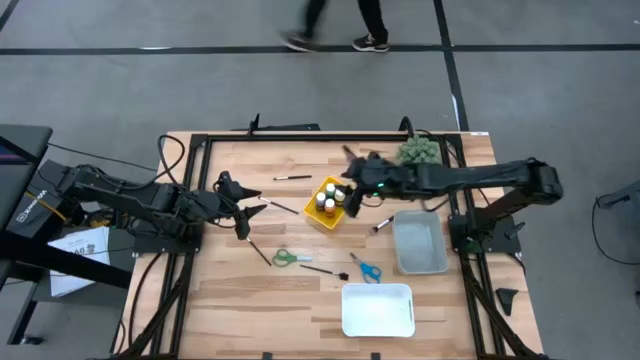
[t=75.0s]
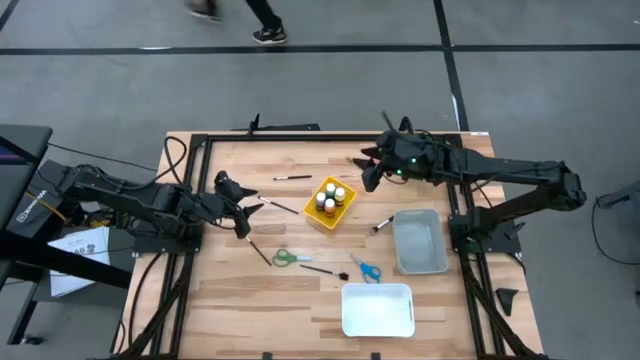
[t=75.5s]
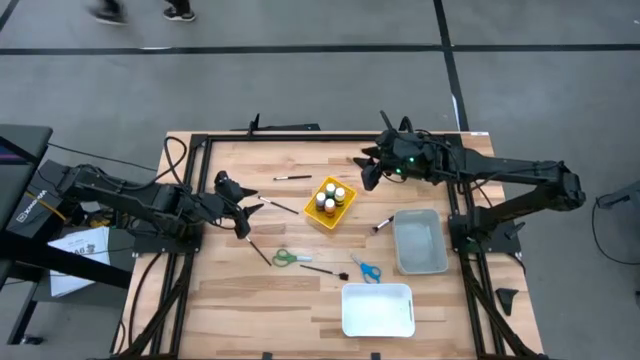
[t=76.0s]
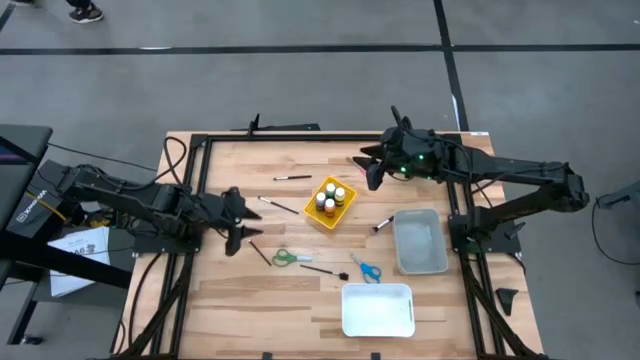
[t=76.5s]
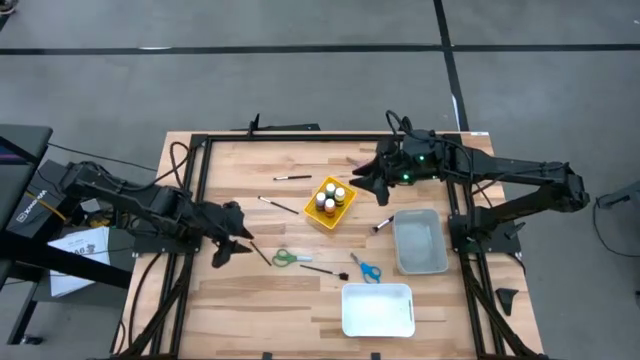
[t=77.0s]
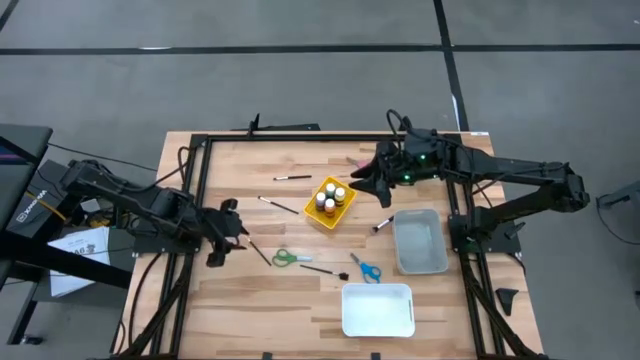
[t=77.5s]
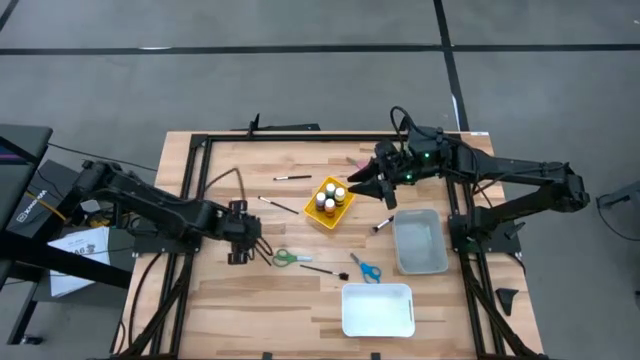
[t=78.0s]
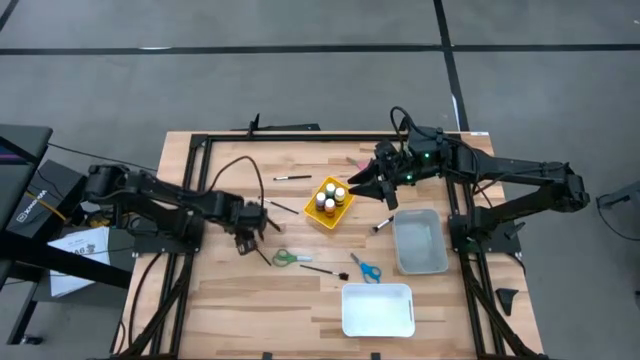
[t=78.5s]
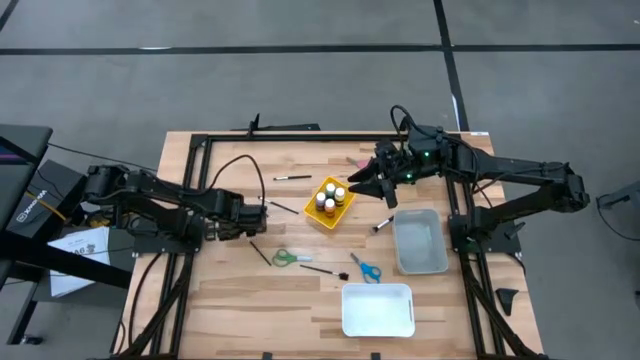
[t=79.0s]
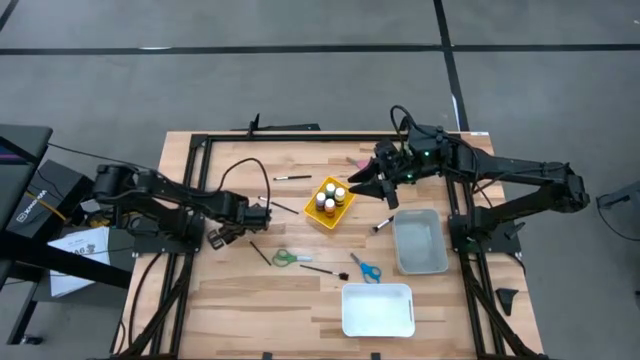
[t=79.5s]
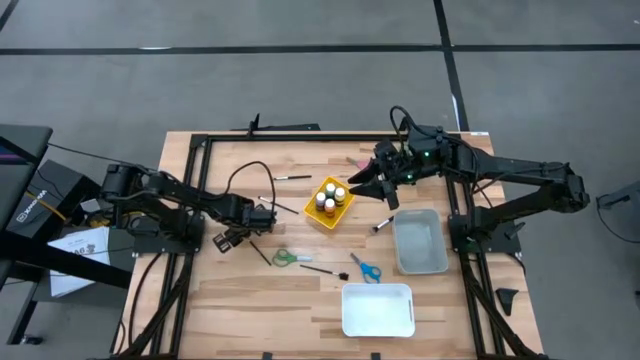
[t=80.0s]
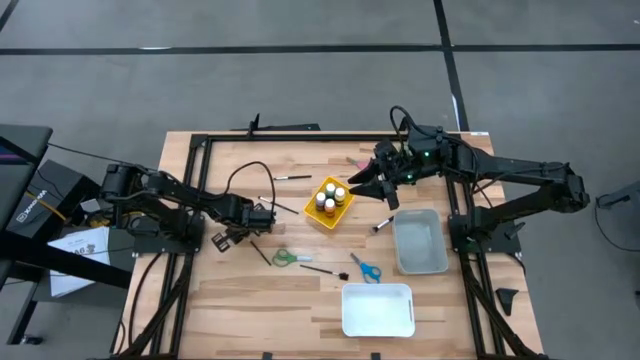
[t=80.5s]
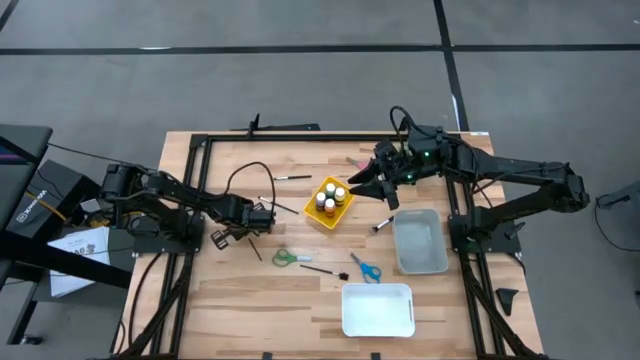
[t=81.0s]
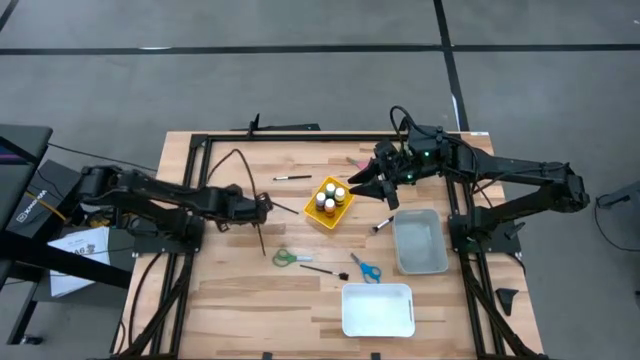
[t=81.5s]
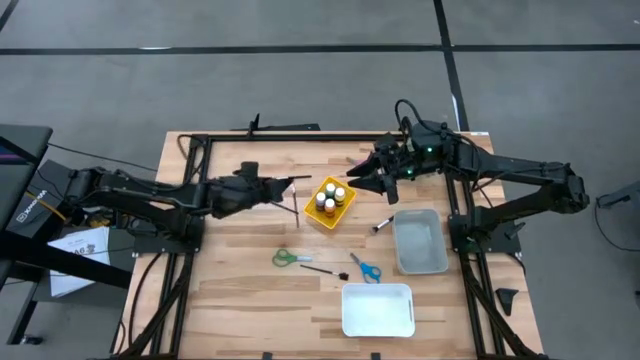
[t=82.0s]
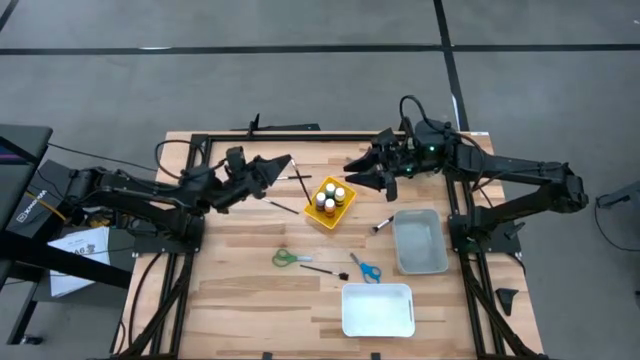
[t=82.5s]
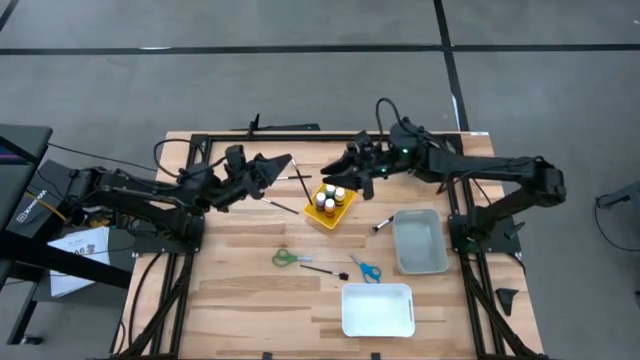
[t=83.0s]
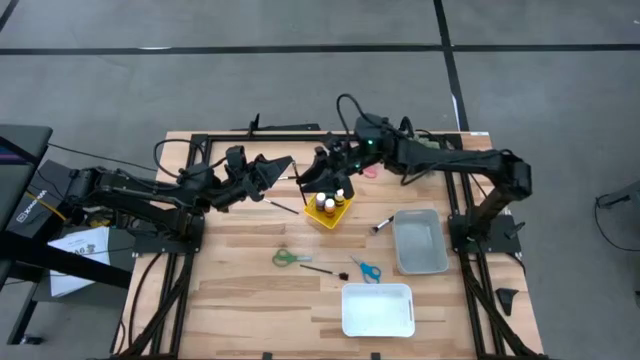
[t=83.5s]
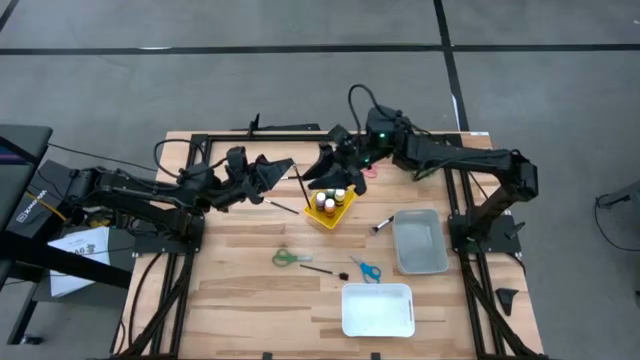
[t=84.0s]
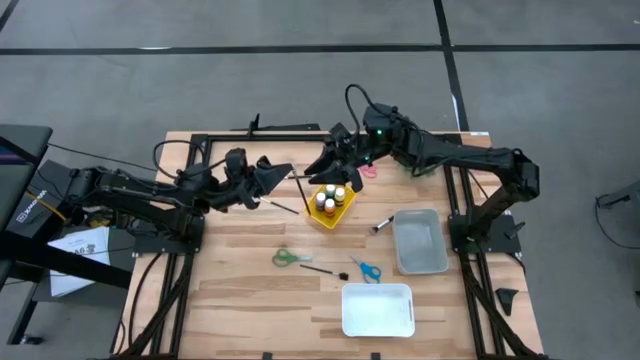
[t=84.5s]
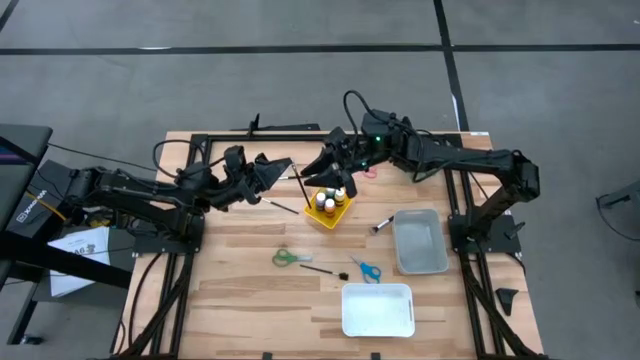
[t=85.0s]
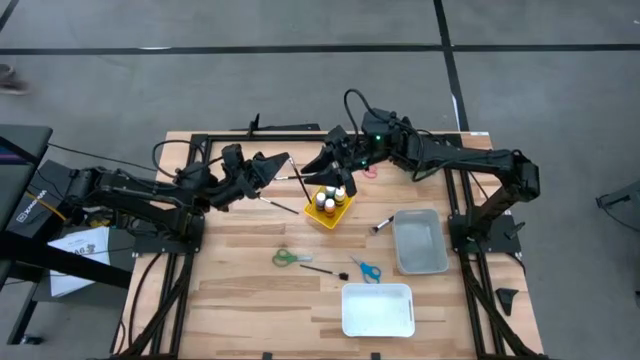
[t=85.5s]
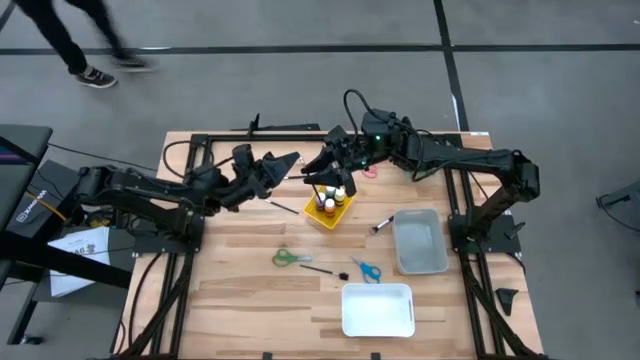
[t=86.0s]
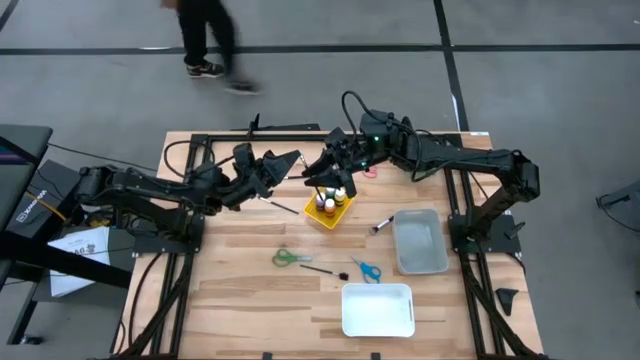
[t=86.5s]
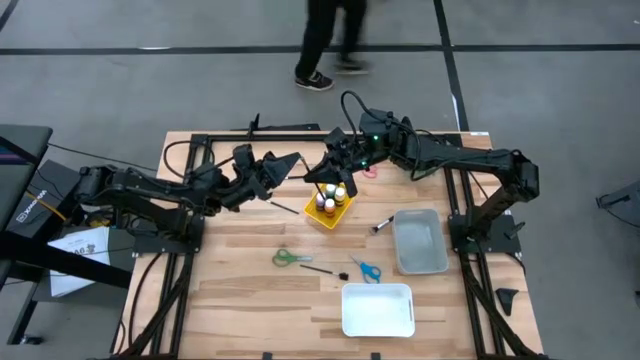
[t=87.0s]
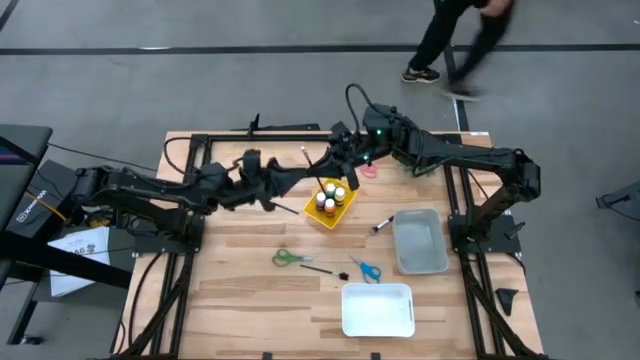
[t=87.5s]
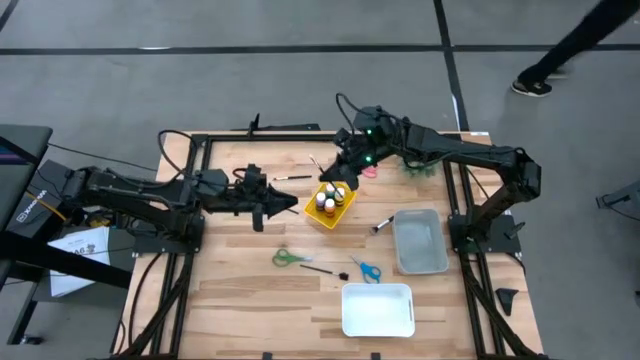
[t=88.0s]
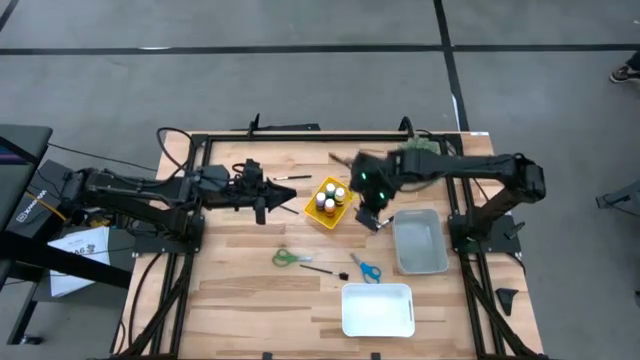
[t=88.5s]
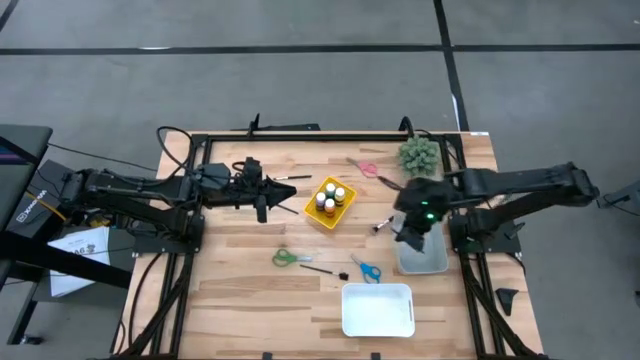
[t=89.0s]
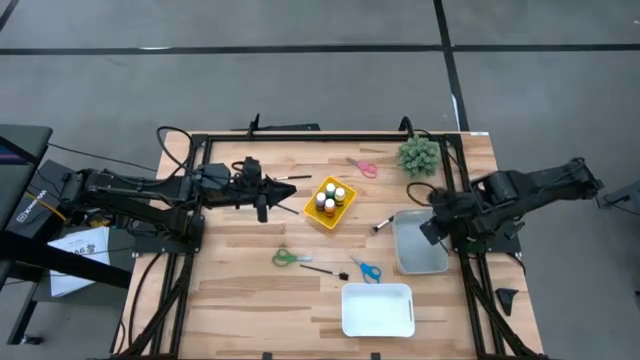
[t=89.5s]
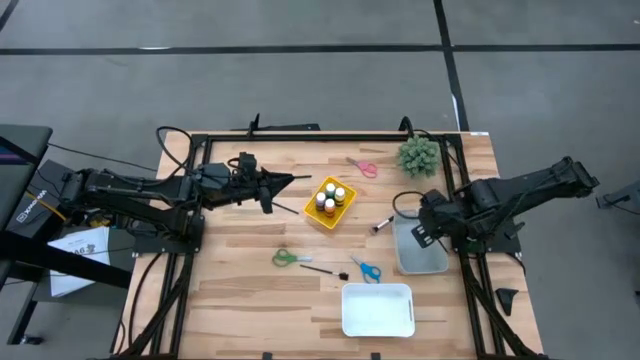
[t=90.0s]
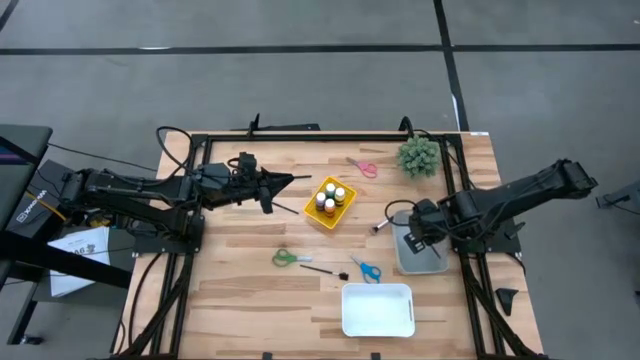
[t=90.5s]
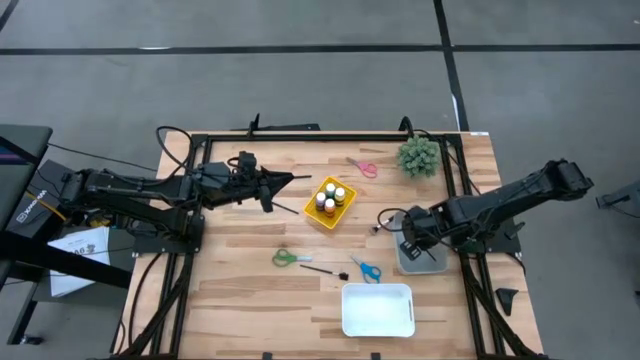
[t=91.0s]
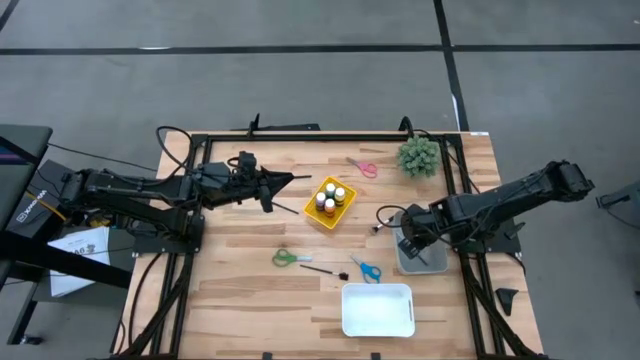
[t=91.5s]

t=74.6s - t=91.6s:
Task: Pick & Place Paint Supplies
Put the bottom left black eyeshadow brush into the gray bin
